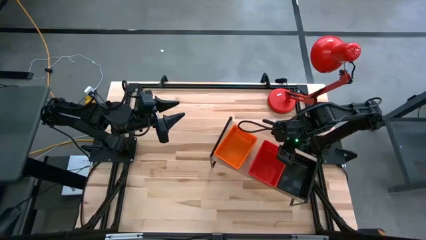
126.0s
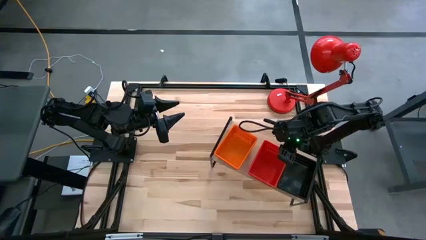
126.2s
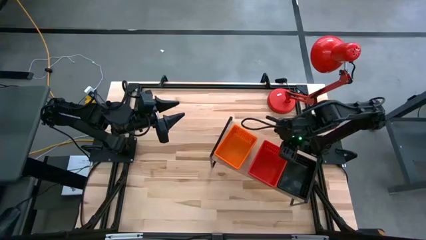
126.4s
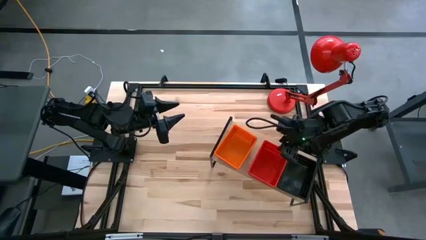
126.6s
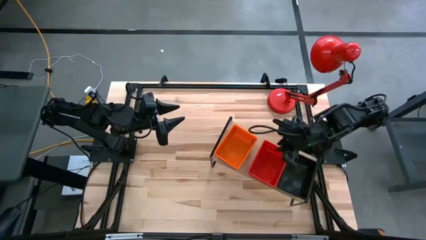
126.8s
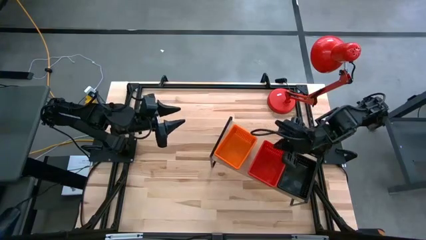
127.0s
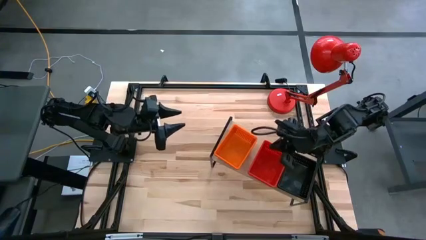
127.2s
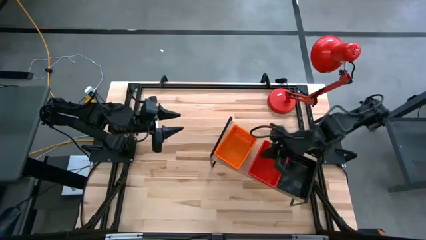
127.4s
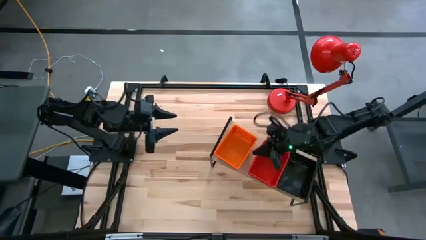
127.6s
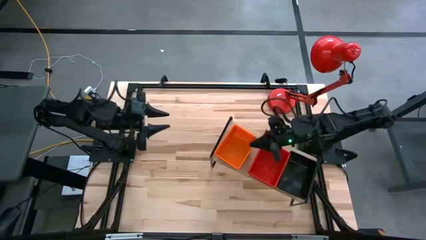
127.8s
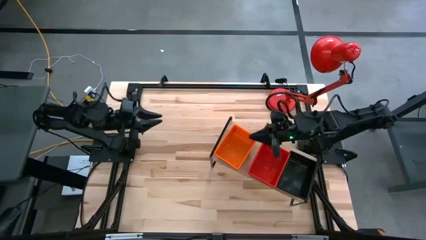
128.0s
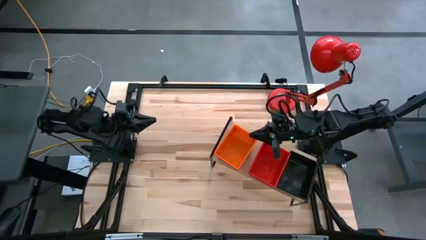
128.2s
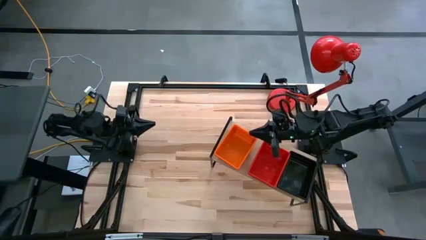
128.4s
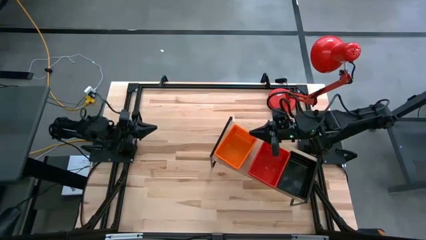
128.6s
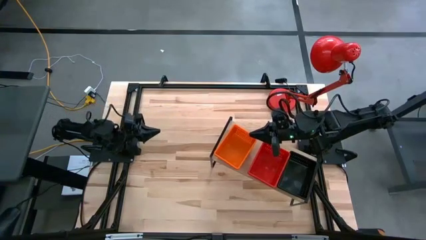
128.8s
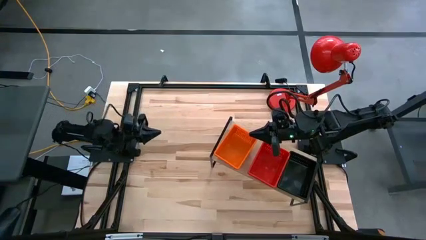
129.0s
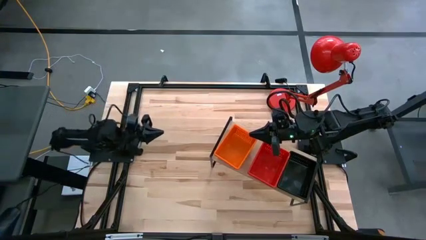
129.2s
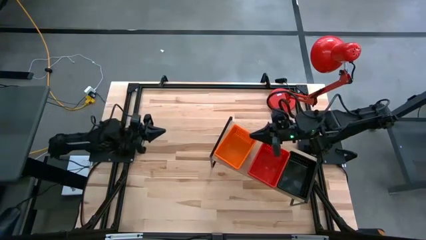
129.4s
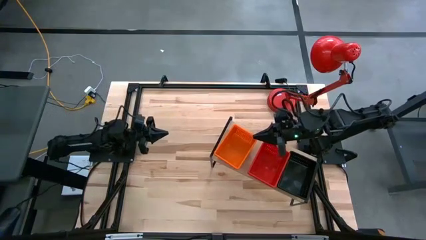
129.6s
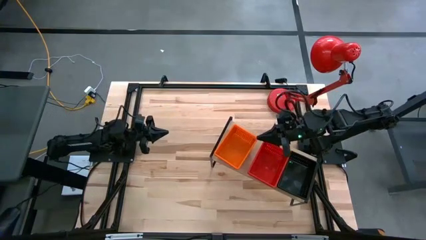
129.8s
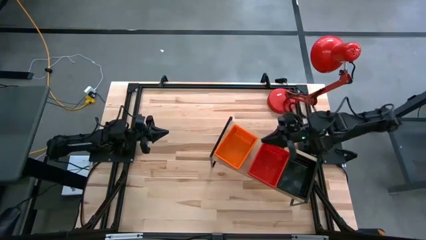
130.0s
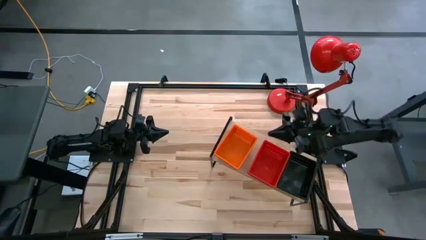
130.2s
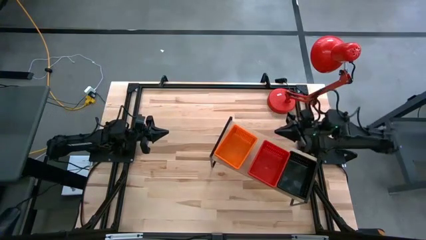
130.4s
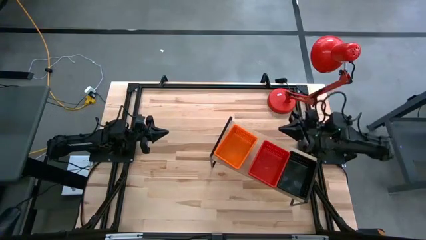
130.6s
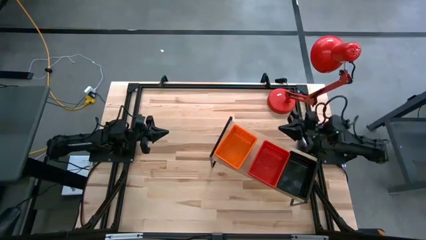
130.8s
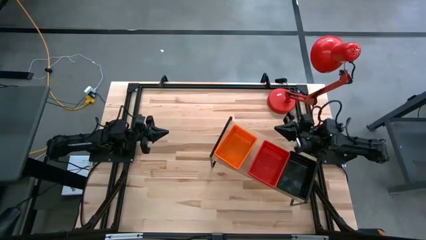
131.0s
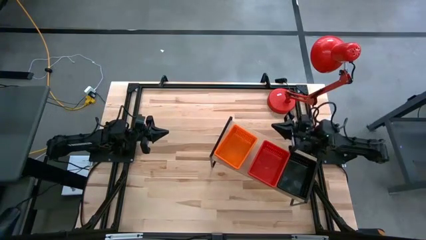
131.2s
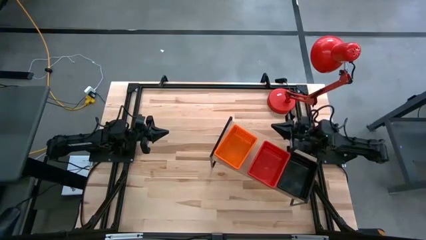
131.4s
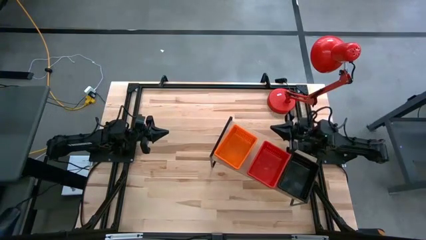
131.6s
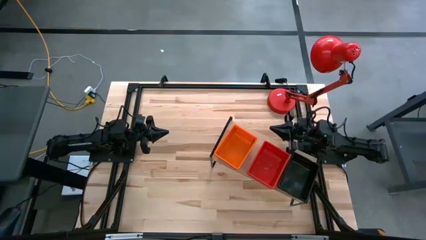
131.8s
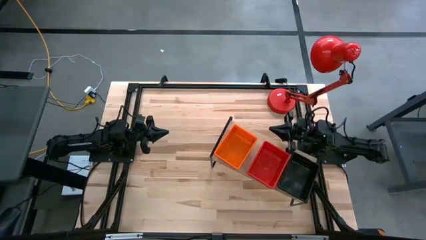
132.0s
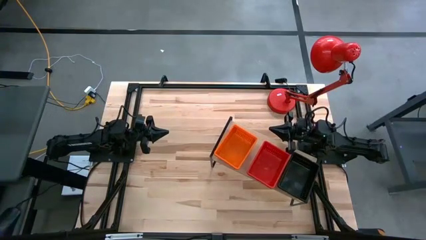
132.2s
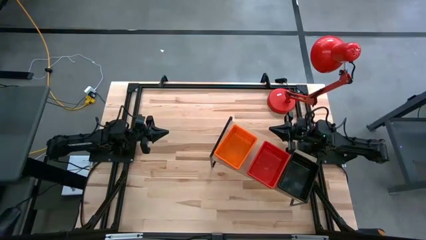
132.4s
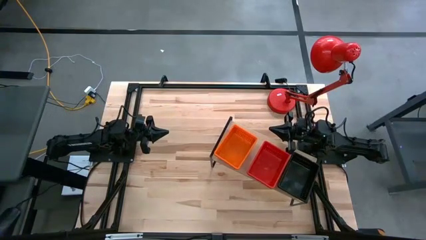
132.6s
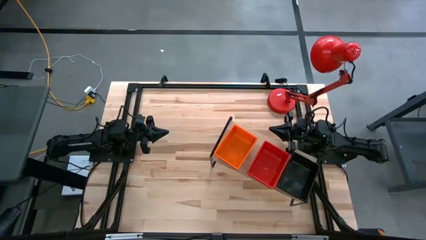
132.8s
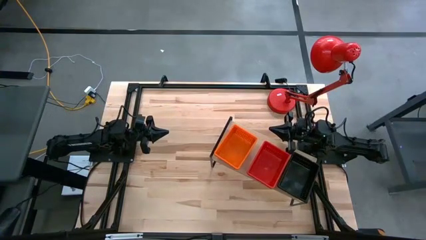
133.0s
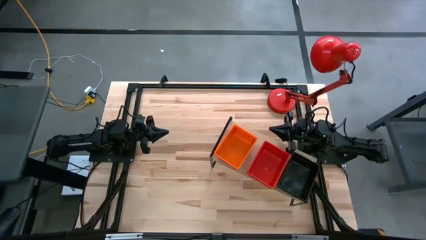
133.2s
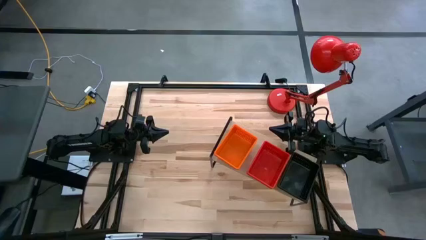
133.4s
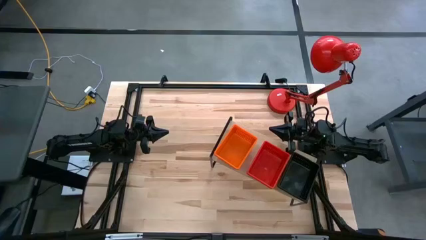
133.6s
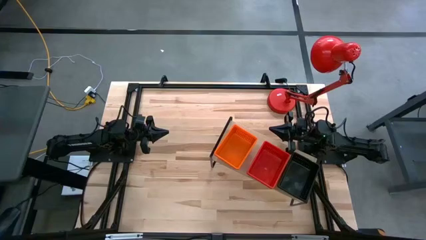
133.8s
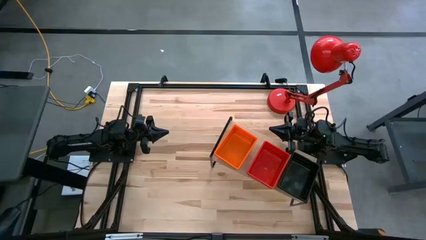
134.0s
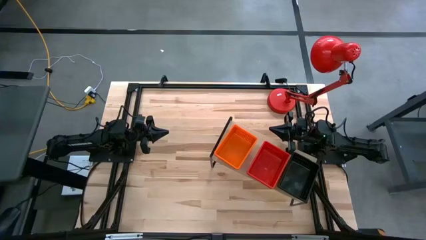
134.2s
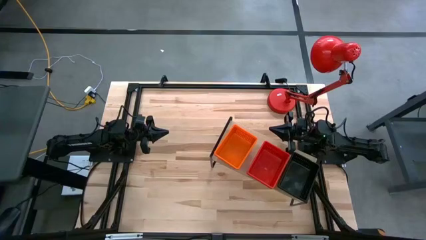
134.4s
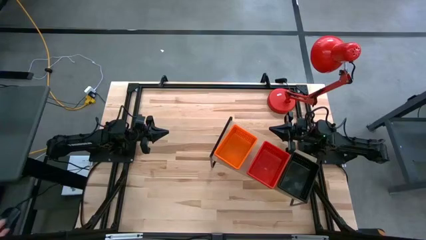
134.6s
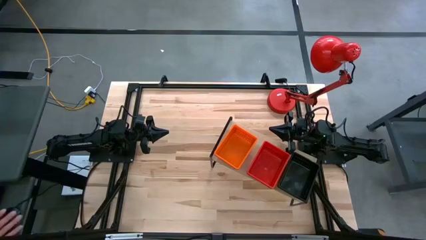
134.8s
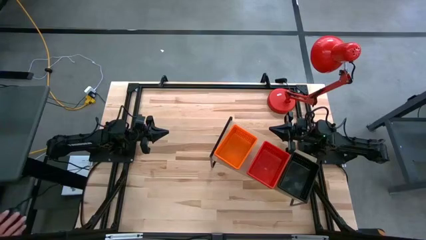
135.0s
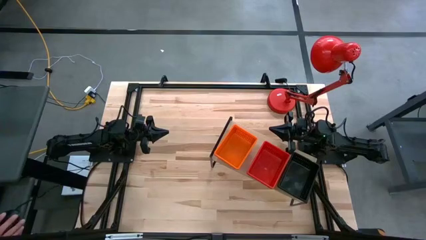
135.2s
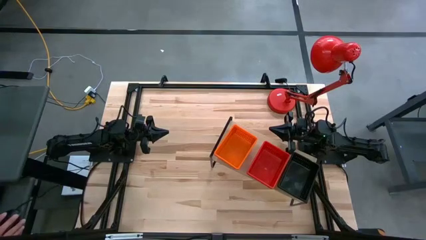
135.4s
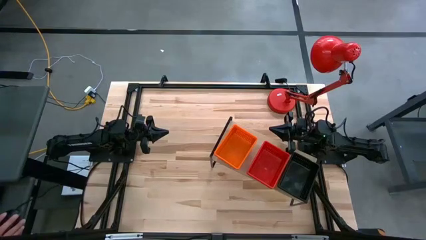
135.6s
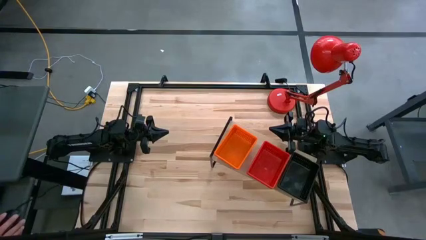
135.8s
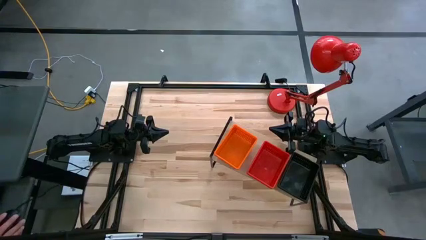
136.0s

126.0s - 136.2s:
Task: Stack baskets on shelf by color
Return to Home Position
